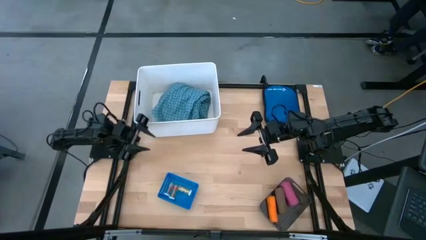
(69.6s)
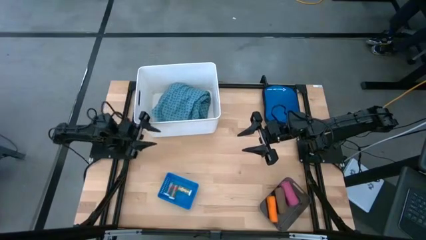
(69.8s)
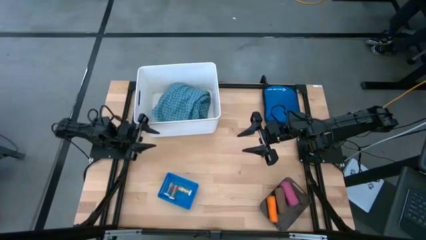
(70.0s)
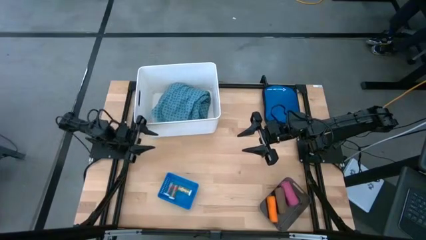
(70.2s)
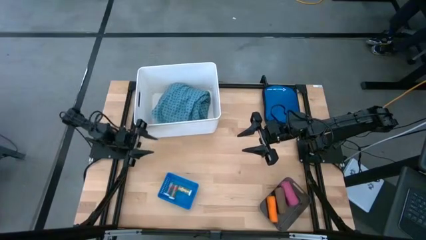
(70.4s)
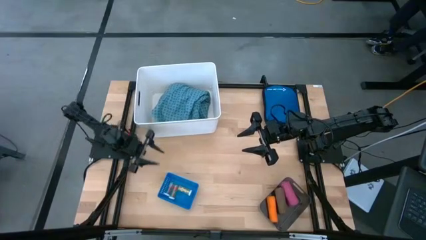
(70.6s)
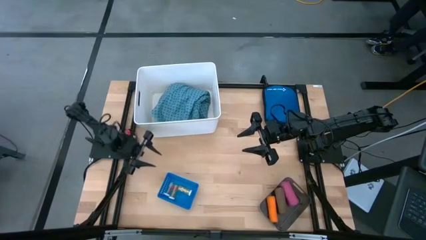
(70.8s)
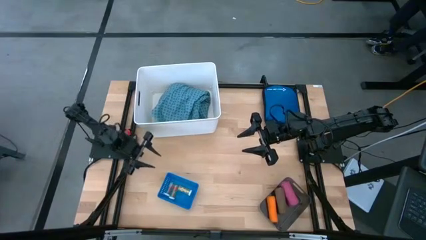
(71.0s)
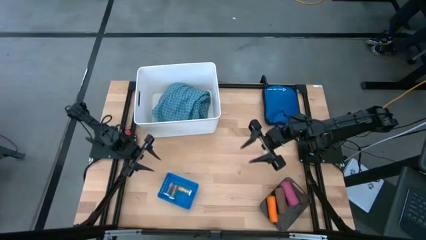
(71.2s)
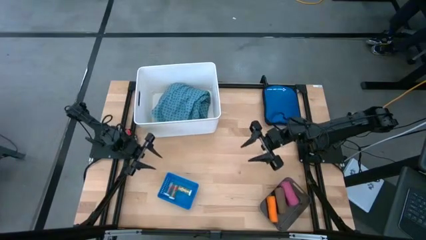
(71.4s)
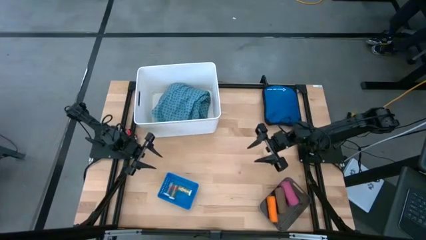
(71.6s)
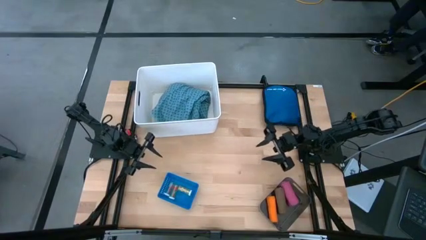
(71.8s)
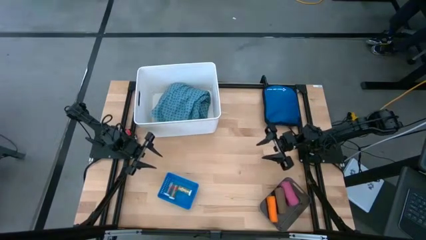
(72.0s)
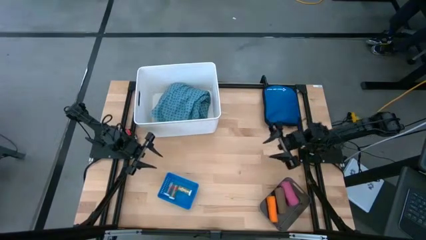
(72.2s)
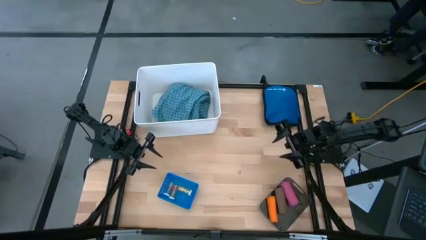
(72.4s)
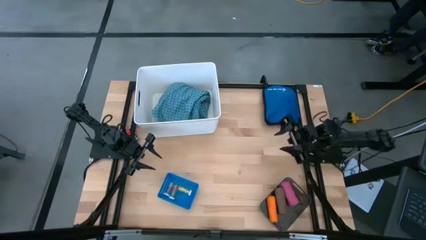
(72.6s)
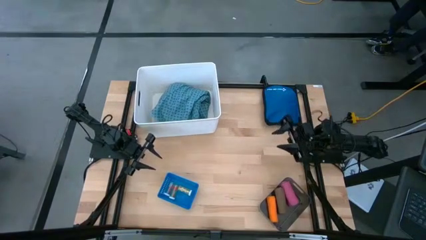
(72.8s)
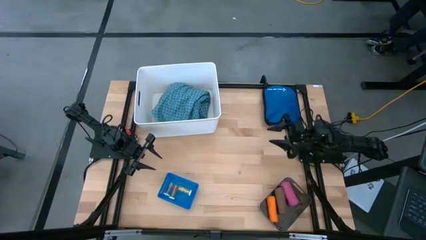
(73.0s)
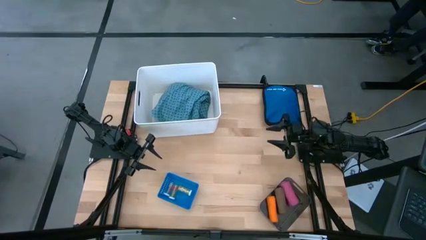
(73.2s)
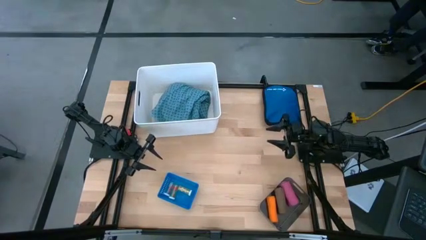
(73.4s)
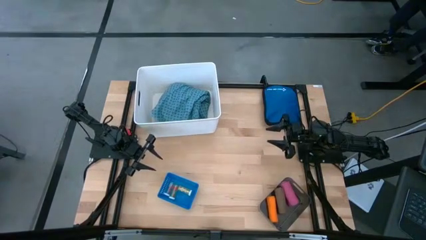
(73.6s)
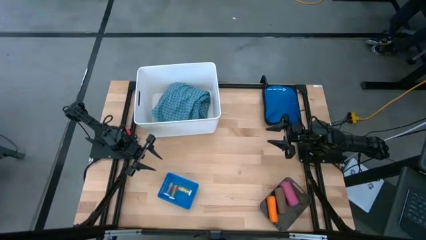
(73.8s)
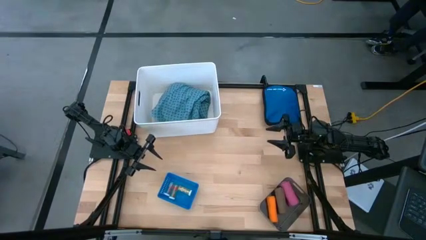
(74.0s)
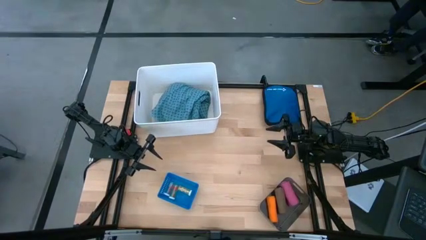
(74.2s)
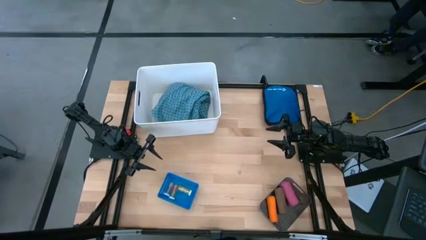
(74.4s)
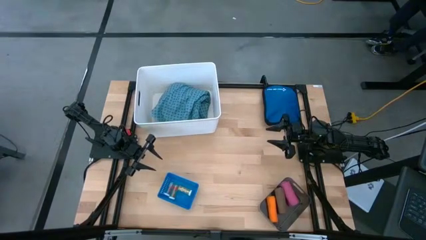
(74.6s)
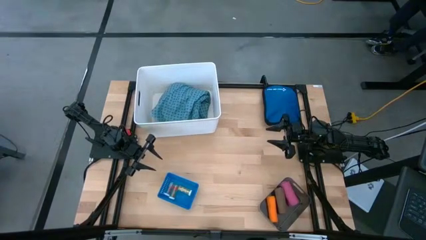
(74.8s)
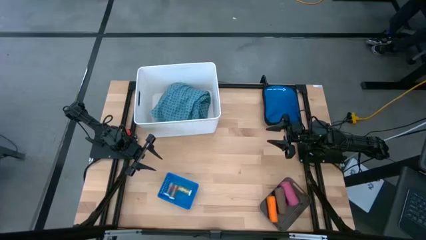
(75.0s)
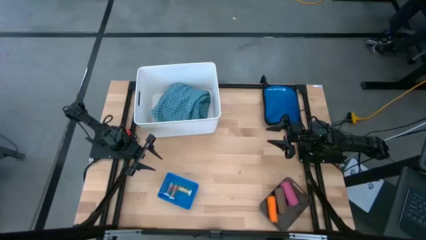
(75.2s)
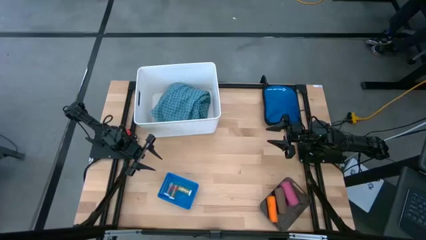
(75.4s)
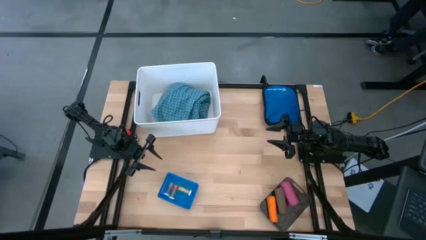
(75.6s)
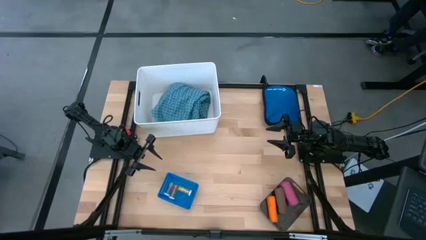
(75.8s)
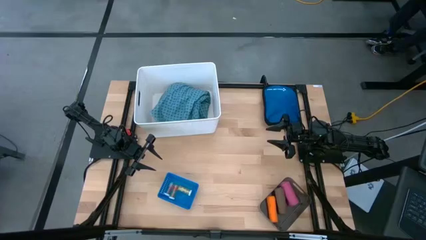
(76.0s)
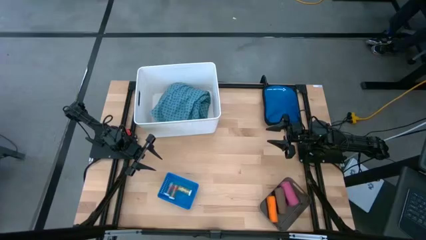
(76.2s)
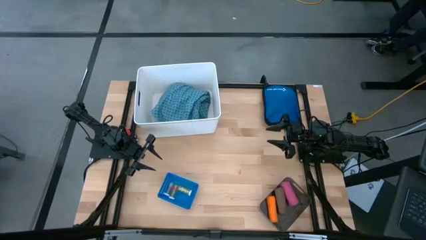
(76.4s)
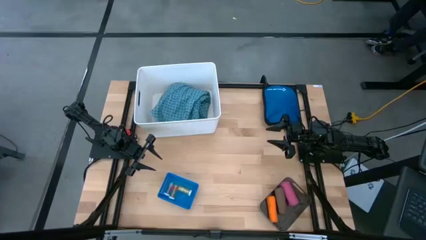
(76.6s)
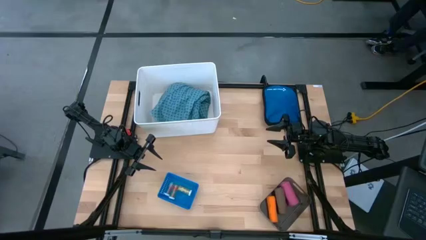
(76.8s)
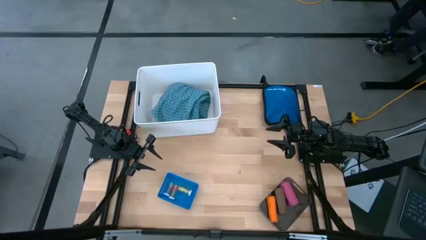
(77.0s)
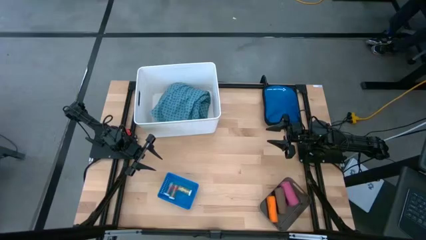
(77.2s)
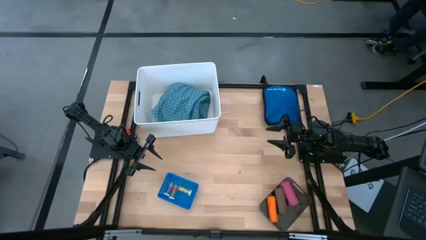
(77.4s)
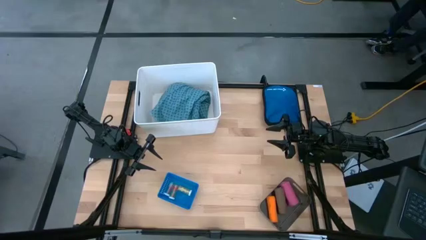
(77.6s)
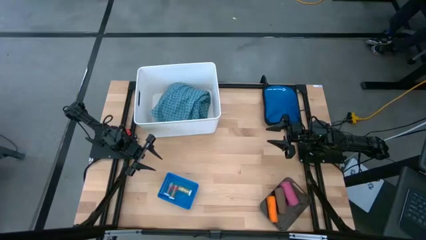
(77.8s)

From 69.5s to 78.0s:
Task: Pick & Place Medicine items
Return to Home Position

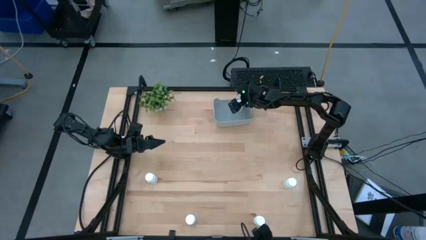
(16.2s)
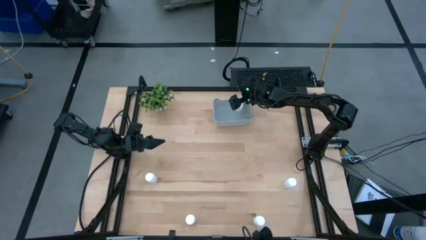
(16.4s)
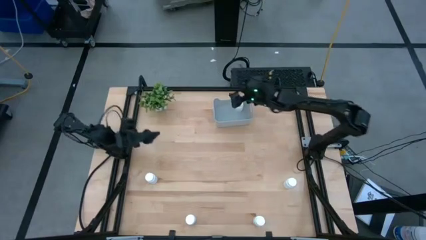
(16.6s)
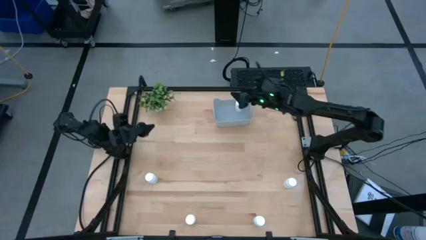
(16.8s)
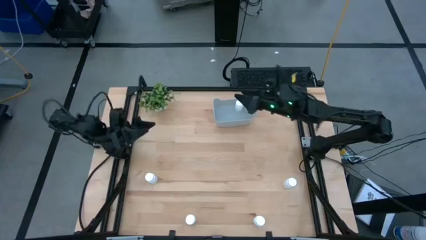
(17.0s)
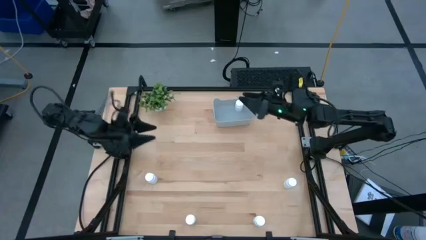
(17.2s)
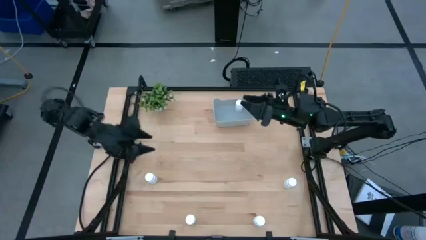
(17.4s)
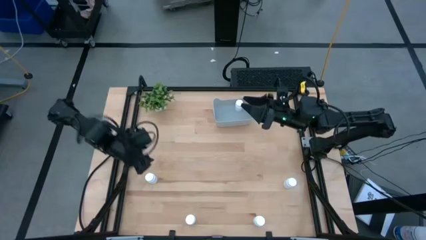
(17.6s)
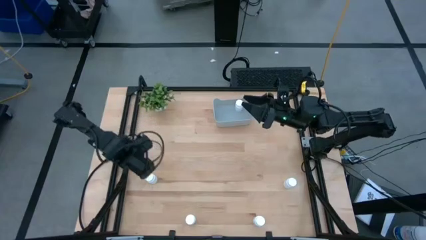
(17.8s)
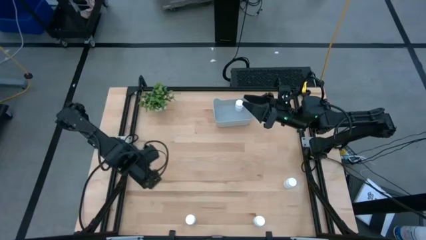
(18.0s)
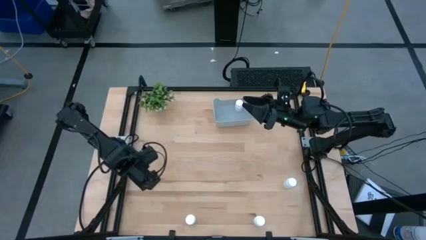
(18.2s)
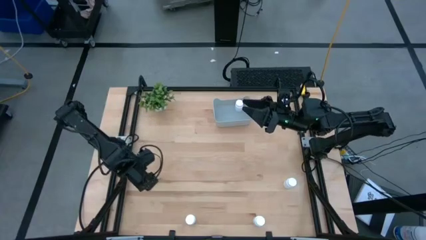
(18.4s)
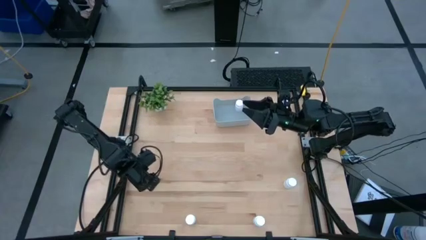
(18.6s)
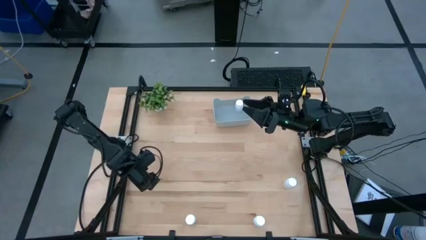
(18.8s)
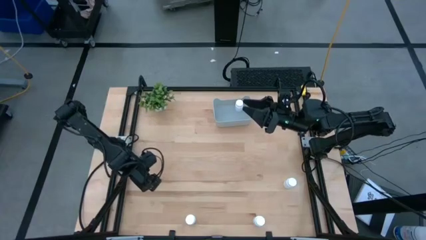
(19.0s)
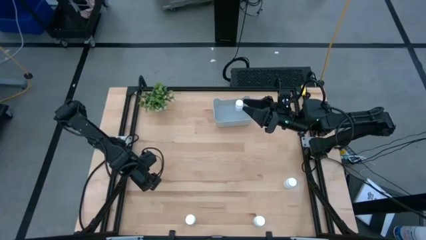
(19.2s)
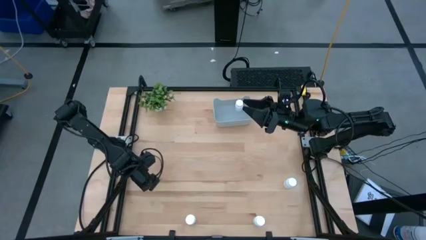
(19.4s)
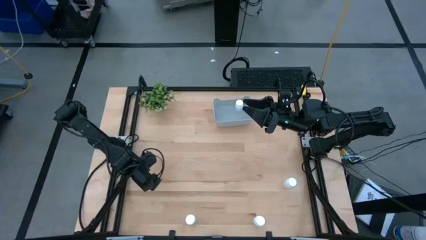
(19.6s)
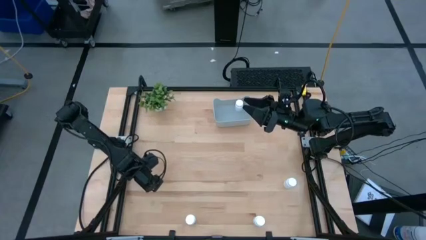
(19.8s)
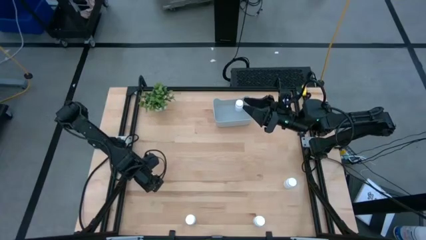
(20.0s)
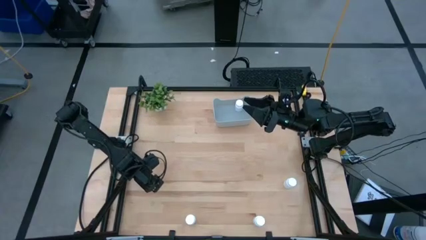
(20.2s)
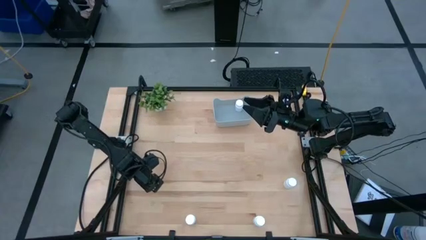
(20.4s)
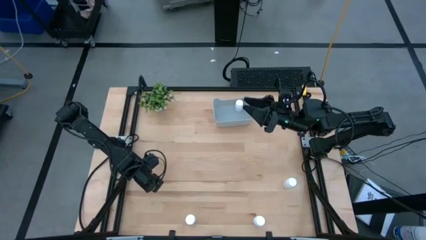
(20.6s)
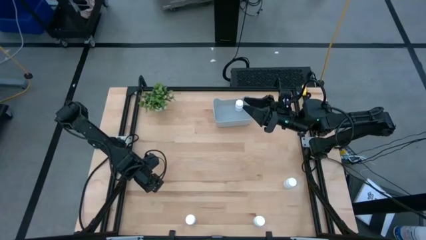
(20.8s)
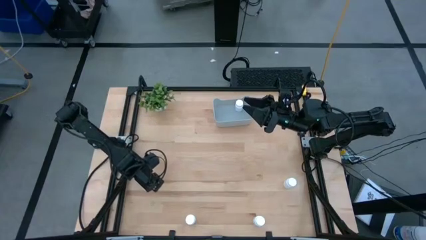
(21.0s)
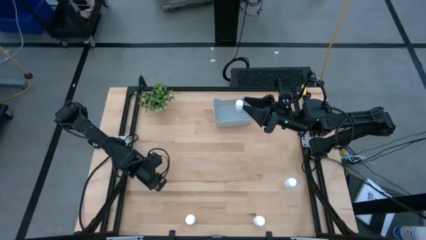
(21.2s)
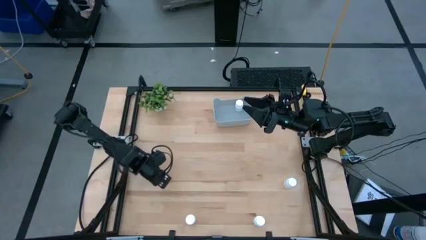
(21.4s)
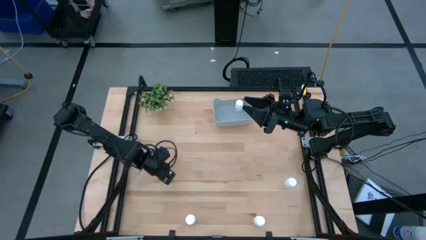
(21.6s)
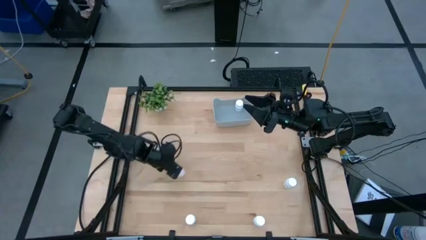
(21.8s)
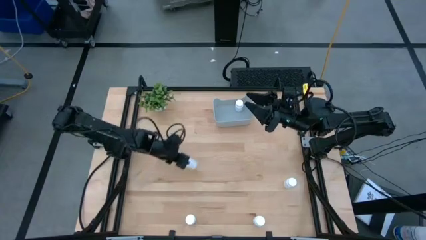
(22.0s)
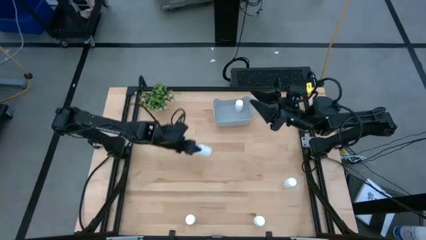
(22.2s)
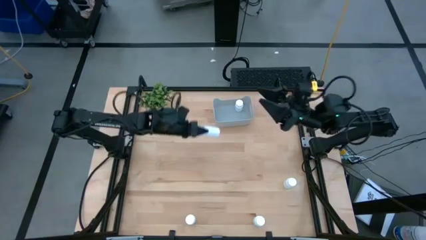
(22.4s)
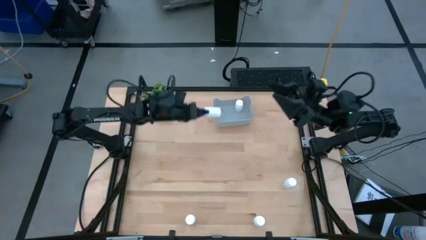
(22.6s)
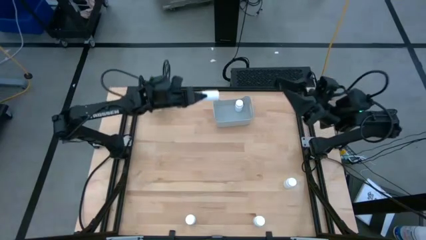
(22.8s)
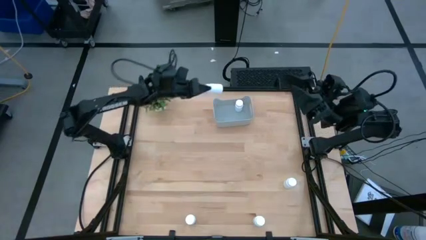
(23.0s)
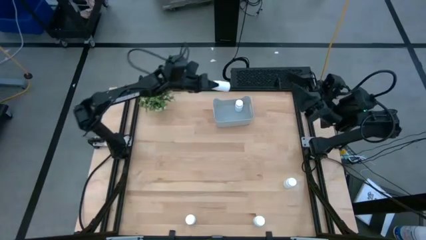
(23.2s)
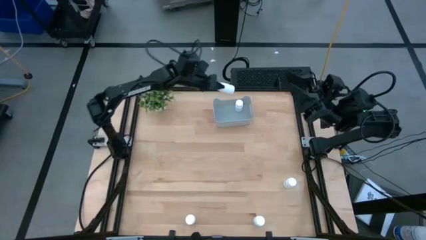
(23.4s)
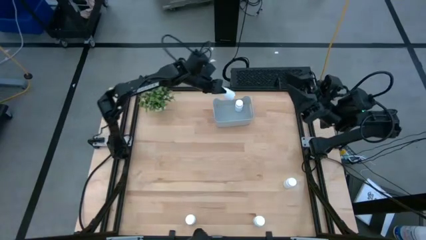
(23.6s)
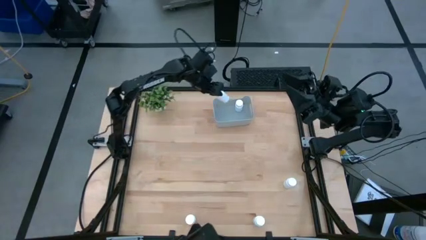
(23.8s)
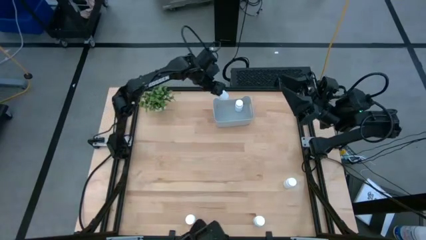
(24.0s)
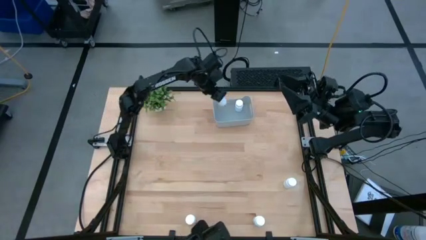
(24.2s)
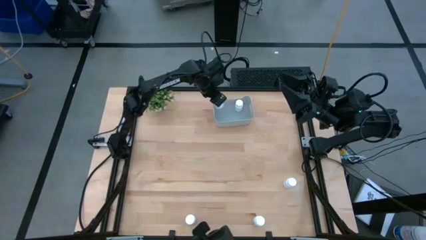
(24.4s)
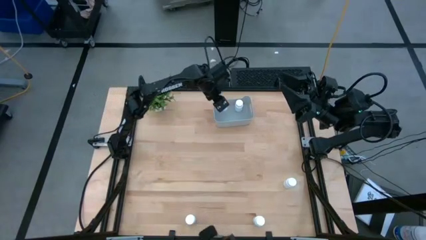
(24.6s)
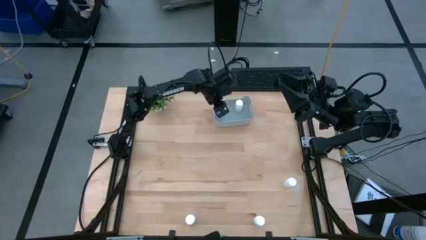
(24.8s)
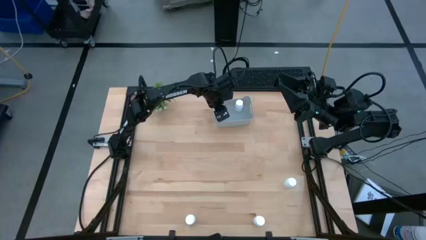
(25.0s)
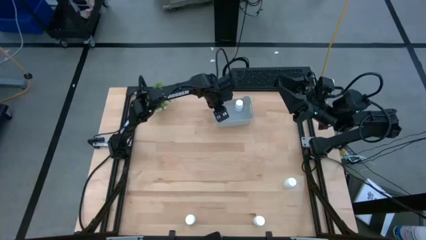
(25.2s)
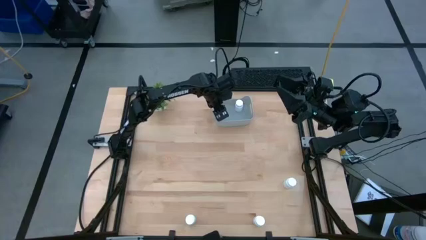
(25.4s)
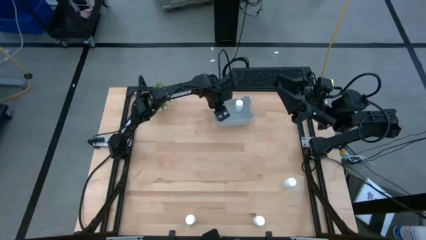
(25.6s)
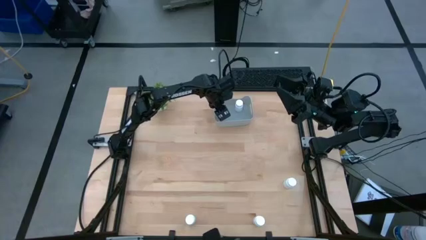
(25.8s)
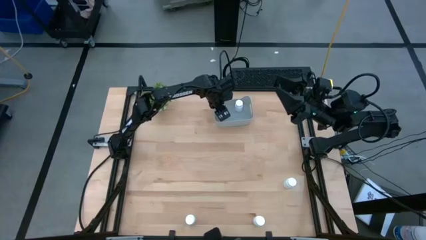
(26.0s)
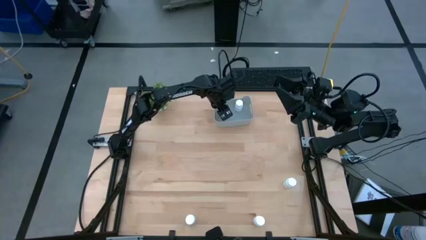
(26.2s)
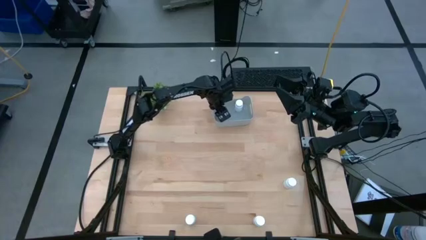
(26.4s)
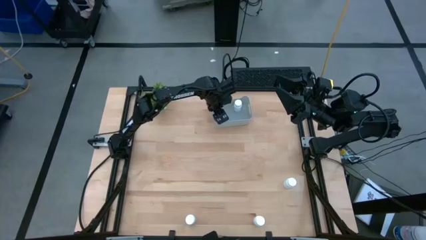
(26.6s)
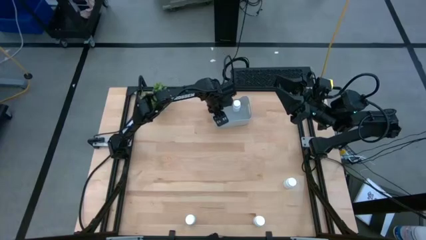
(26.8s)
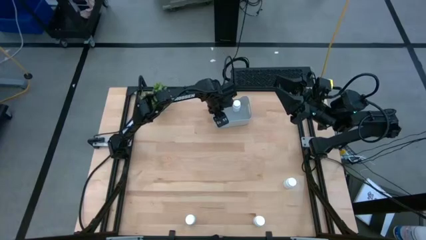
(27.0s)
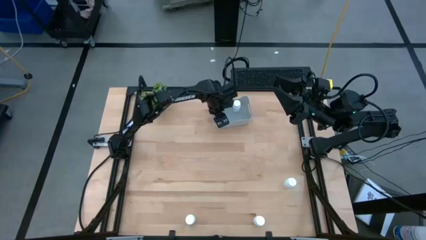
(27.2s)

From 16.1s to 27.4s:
Task: Pick and place pill bottles into a basket
Put the white pill bottle into the gray container
